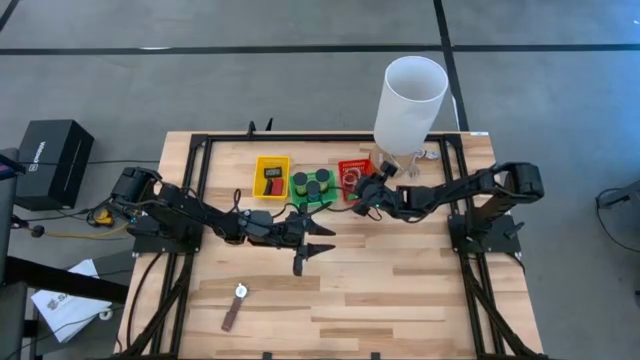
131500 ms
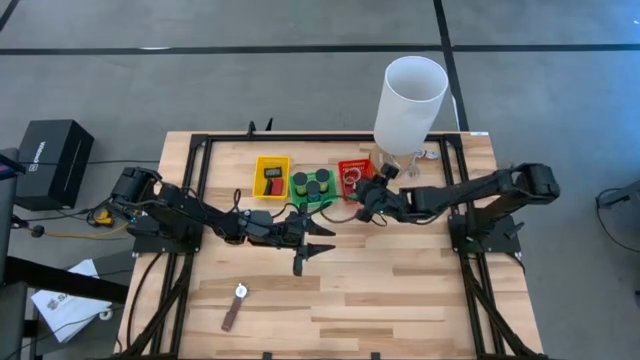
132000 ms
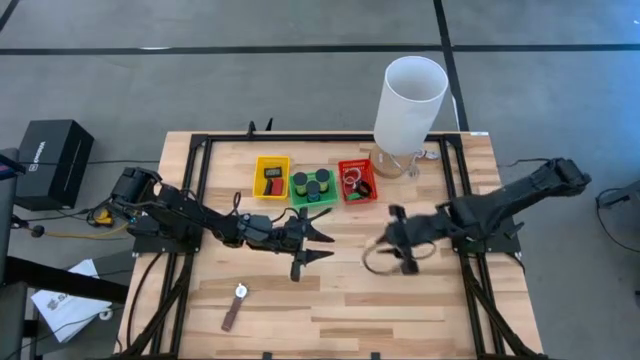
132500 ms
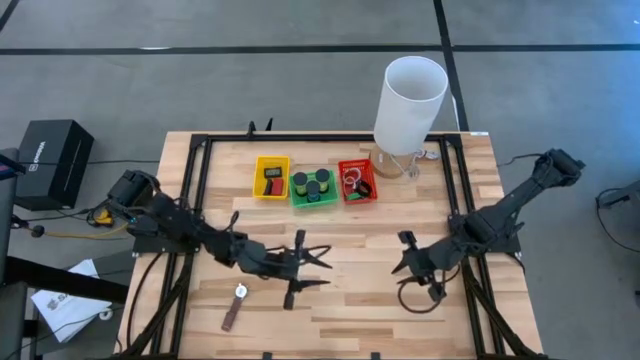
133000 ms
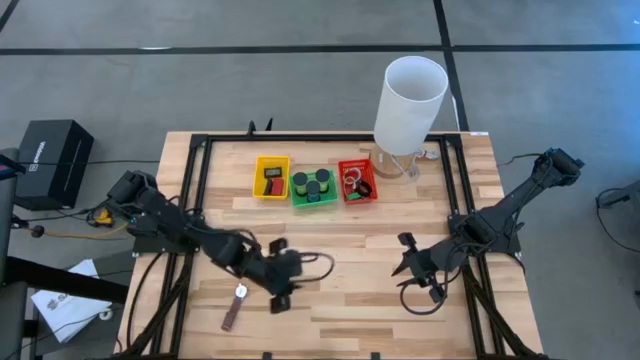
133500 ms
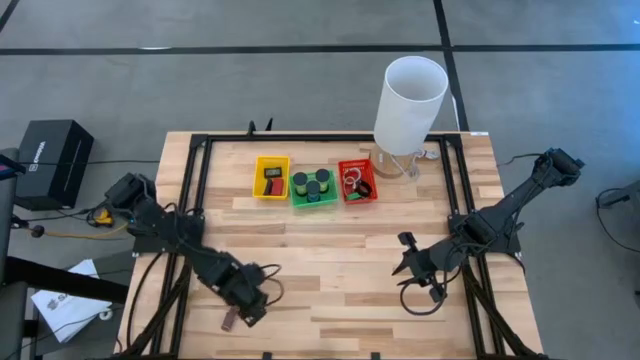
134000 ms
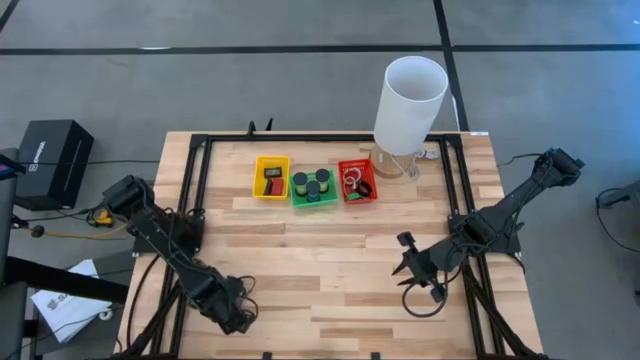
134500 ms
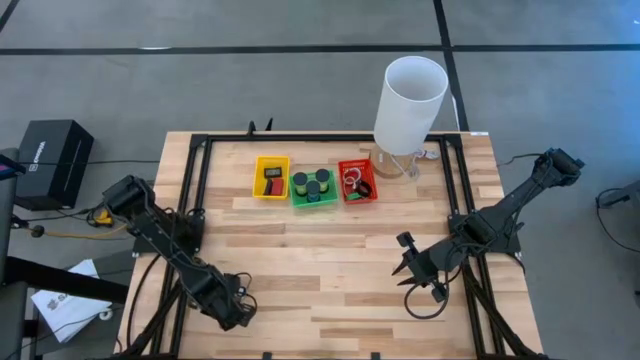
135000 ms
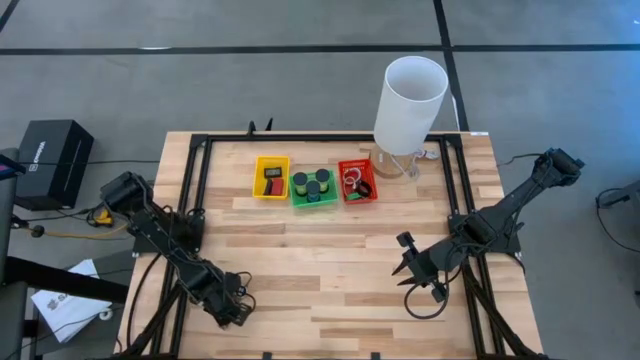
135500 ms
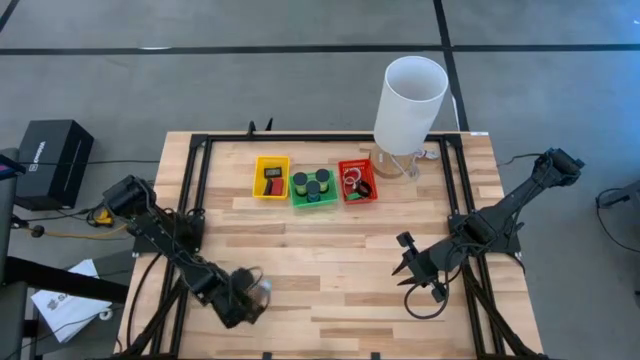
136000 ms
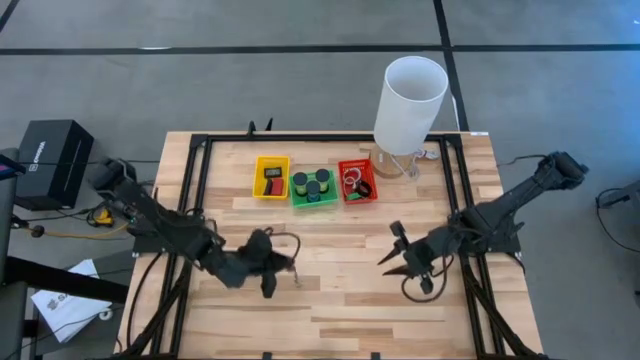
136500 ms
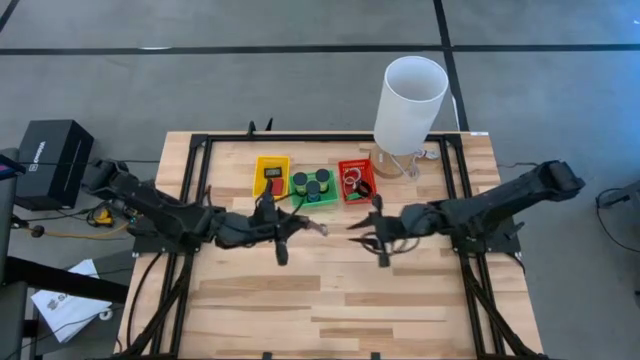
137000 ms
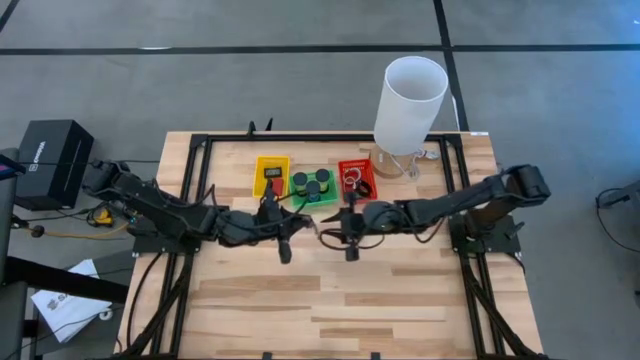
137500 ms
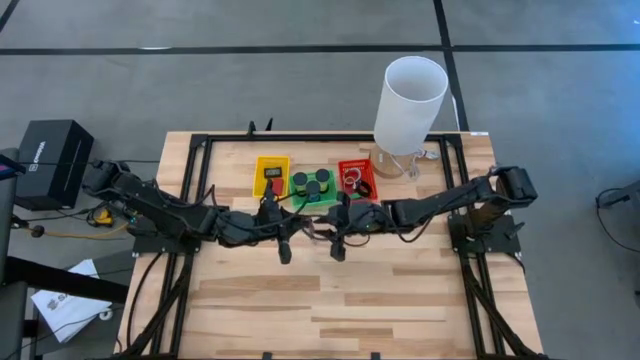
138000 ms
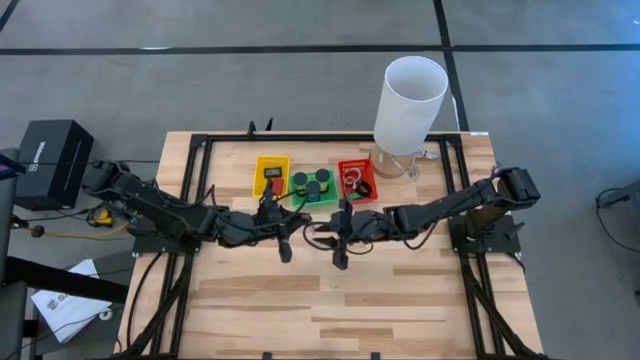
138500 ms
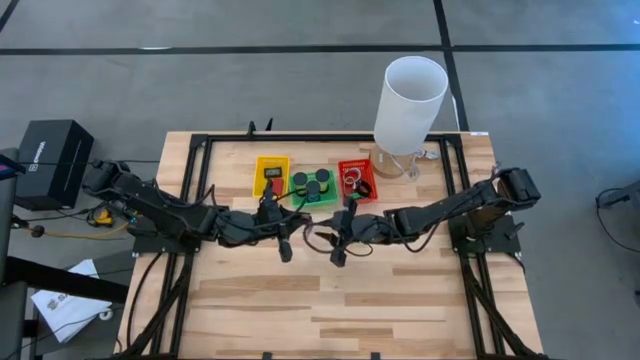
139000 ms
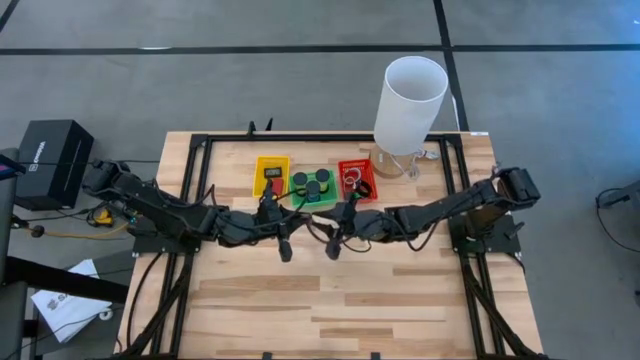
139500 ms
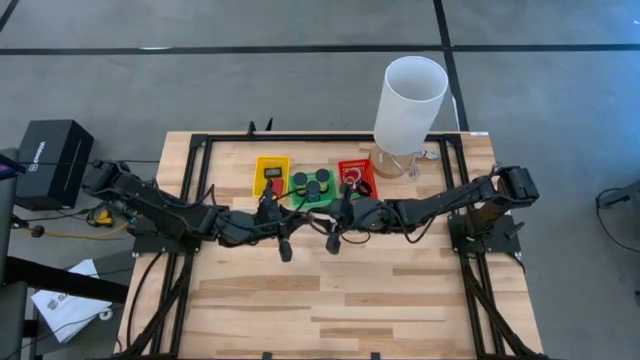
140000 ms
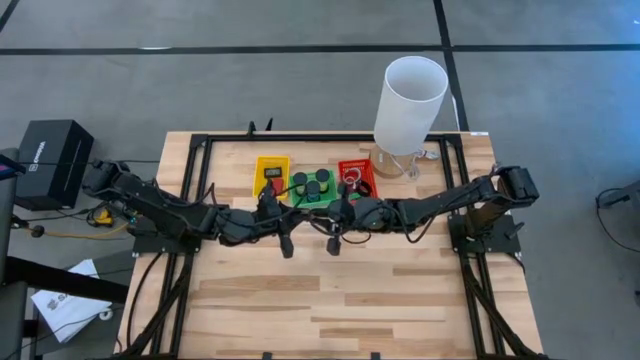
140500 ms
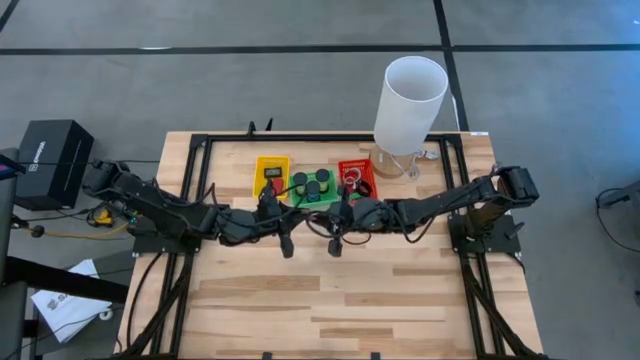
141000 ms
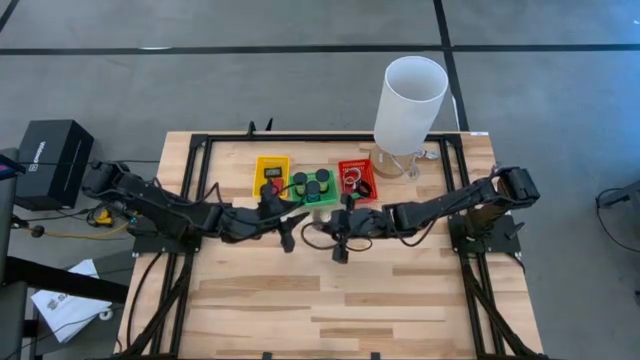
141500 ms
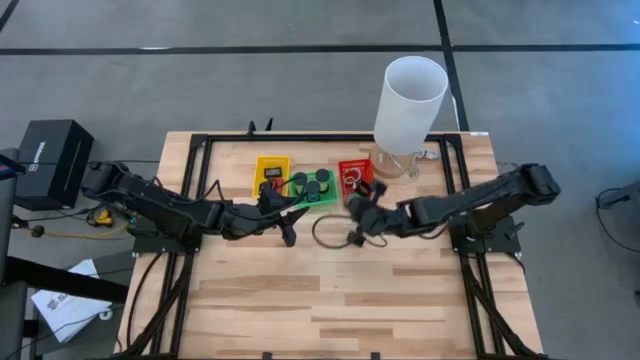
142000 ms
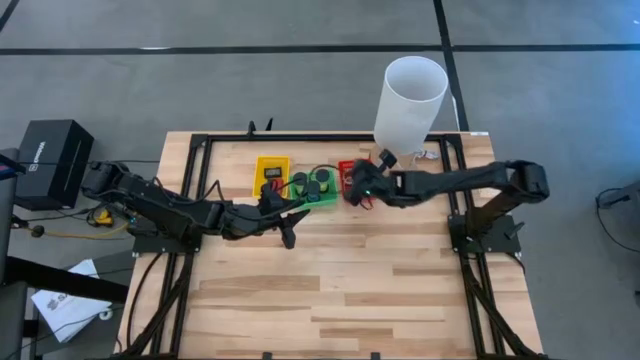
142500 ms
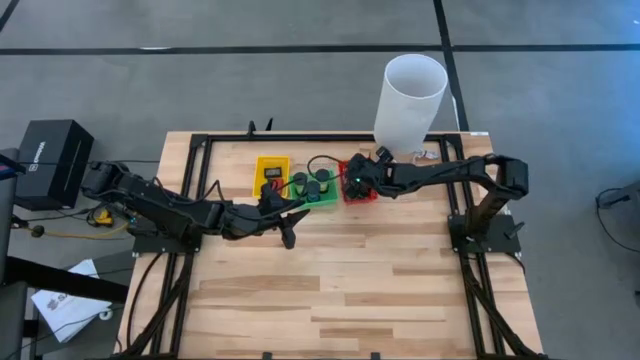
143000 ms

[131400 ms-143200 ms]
Task: Pick & Place Office items
Put the brown wrist watch into the red basket

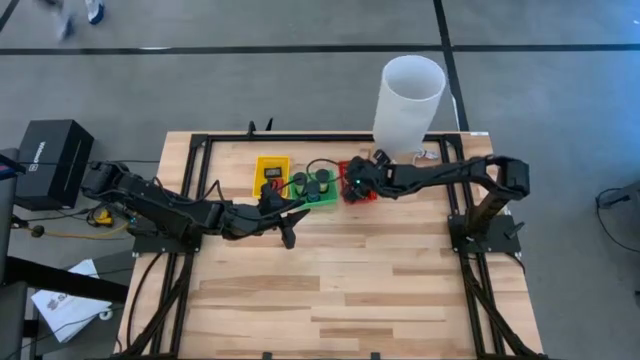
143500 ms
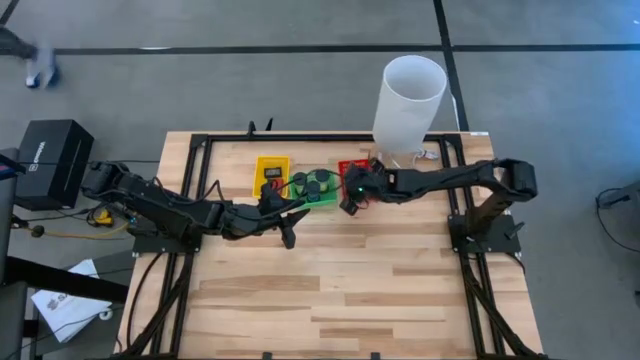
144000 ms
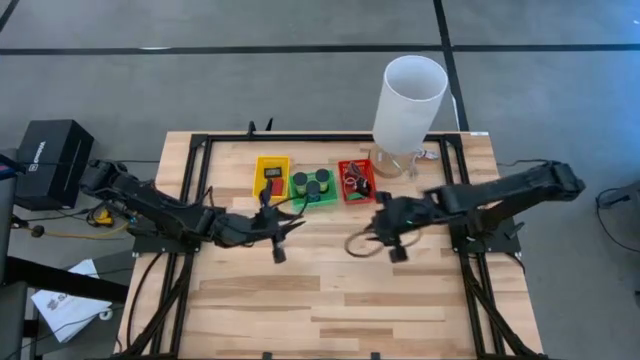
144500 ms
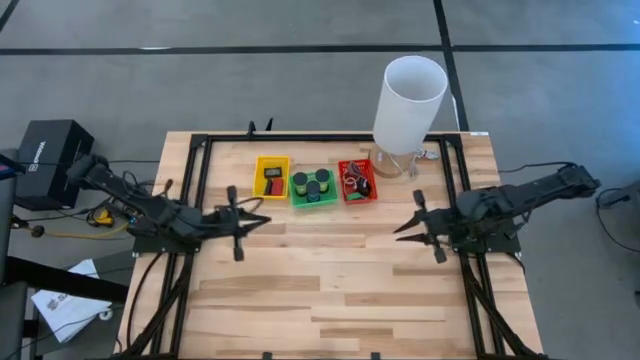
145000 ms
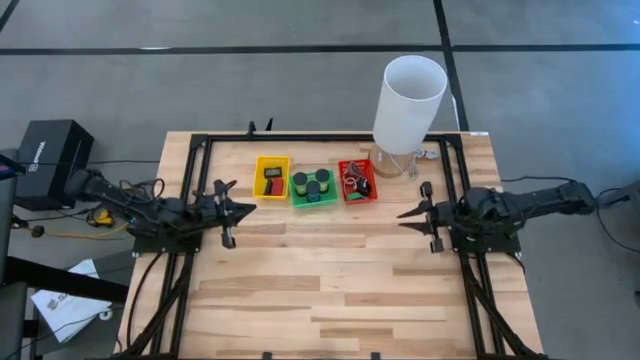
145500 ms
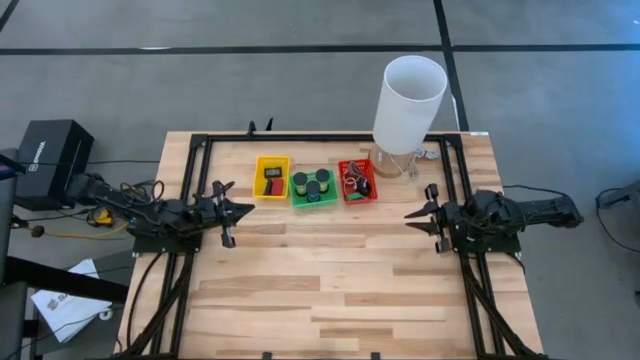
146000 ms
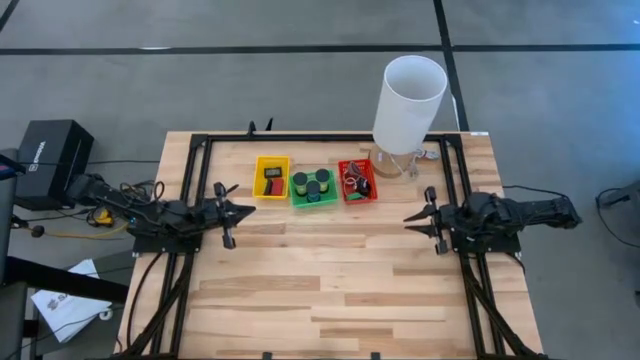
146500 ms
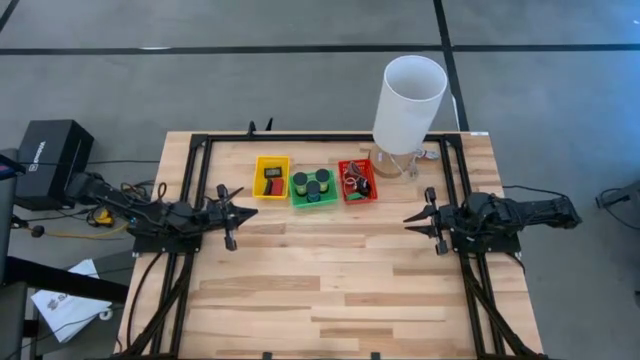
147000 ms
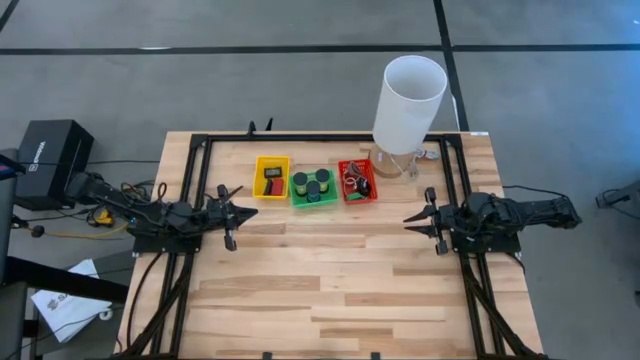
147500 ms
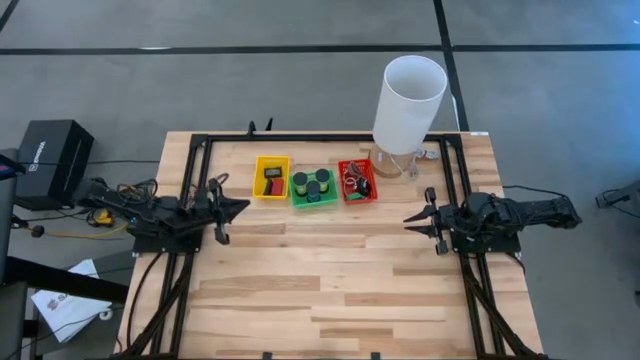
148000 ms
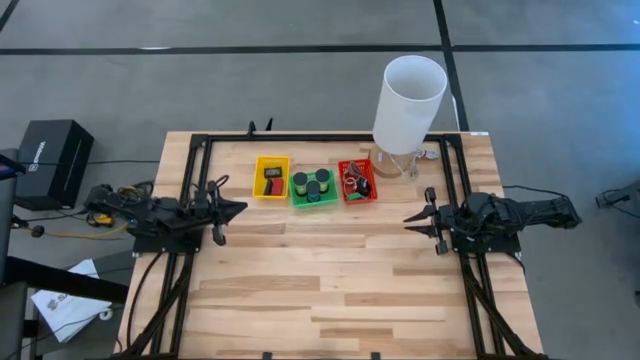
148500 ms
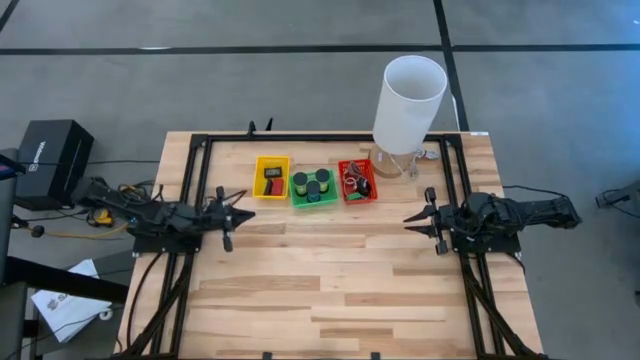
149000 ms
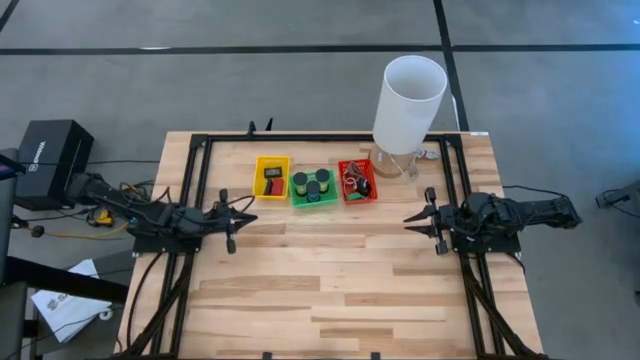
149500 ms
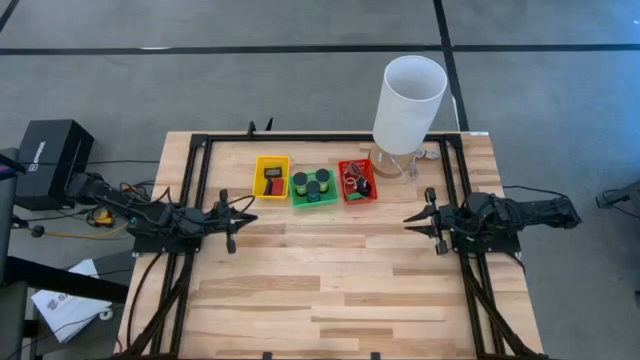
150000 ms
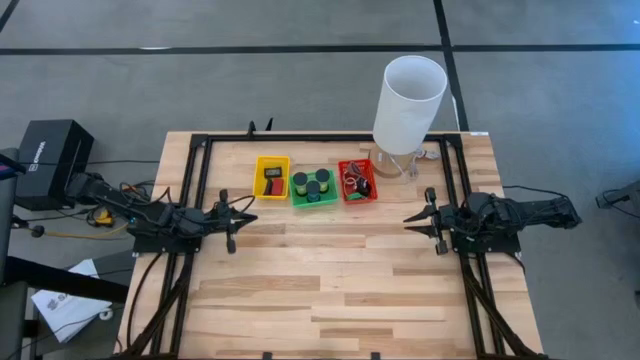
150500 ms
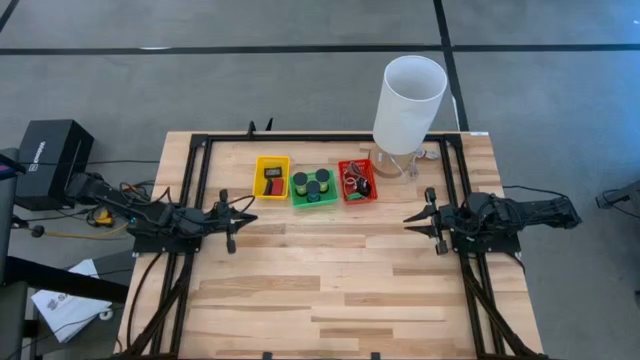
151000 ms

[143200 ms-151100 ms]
Return to Home Position
